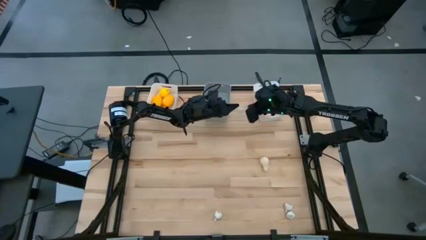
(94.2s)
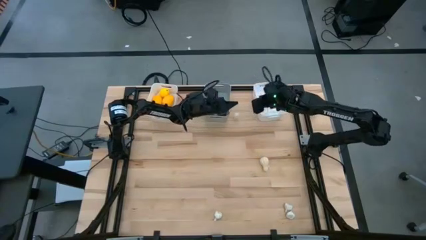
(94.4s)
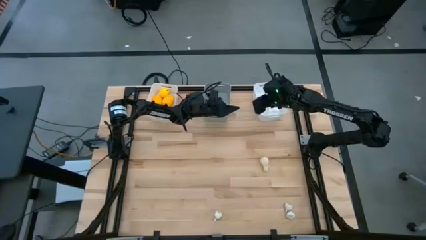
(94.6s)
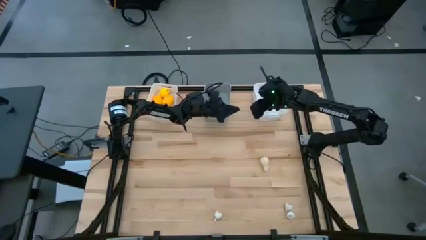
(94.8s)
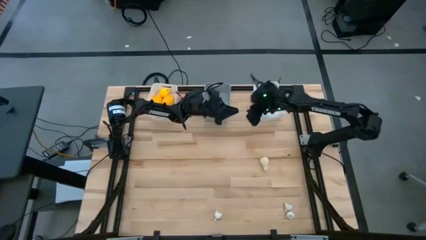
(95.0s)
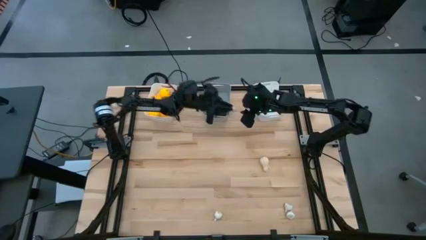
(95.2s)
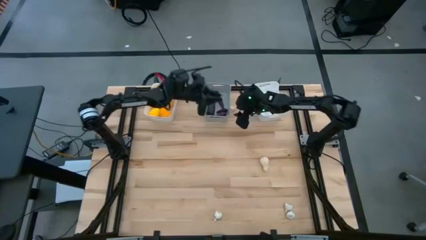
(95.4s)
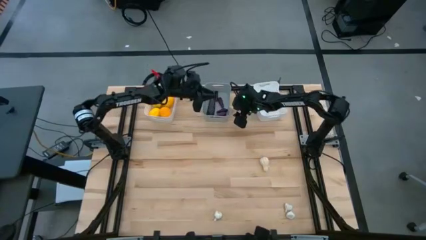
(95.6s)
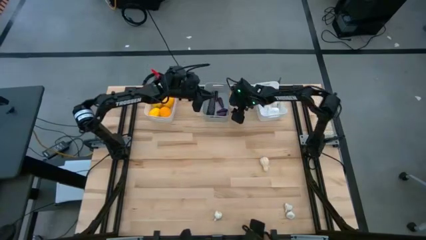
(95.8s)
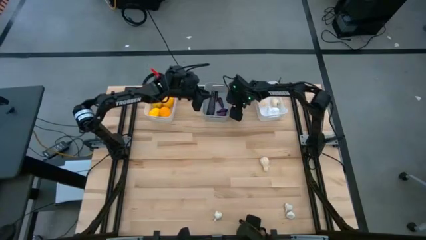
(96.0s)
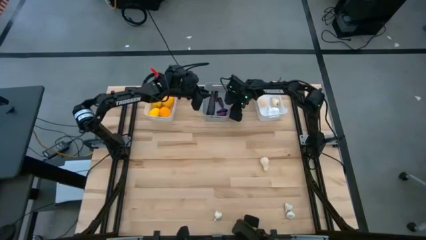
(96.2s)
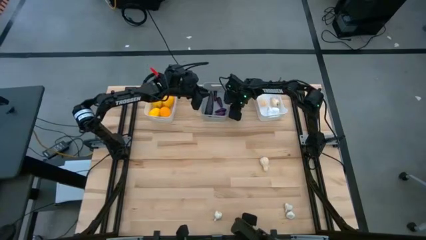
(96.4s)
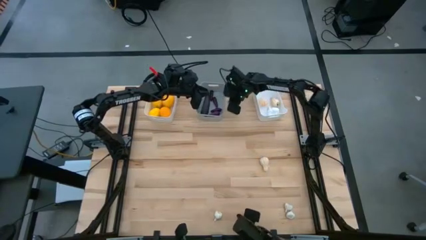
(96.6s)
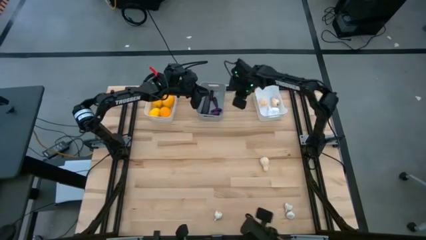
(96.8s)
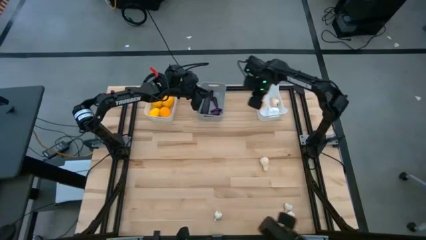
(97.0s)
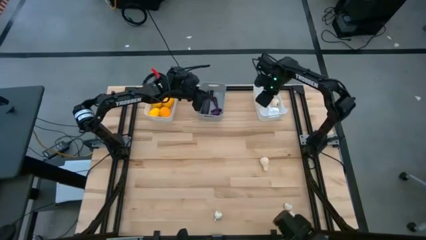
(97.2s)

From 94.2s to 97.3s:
Task: Sort produce into baskets
Put the garlic into the right white bin

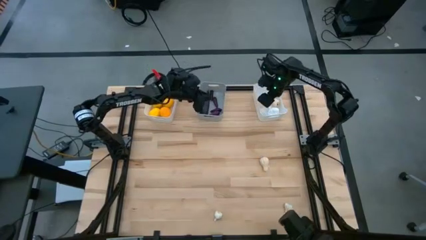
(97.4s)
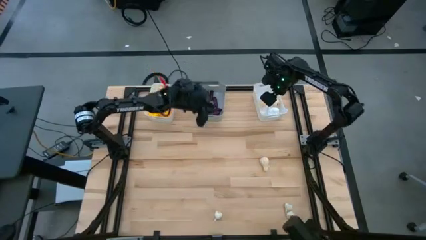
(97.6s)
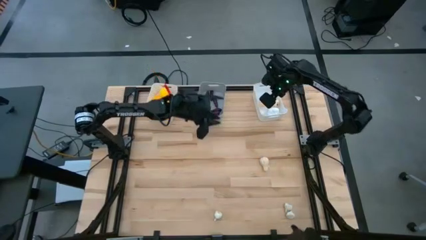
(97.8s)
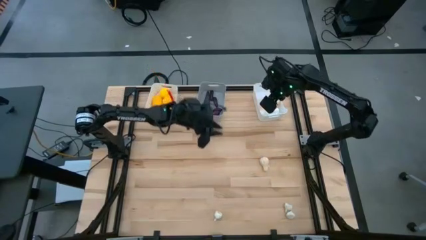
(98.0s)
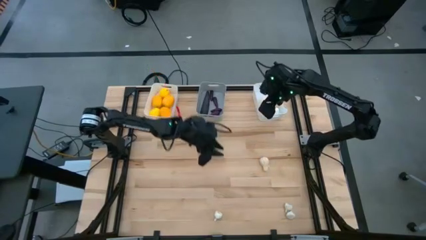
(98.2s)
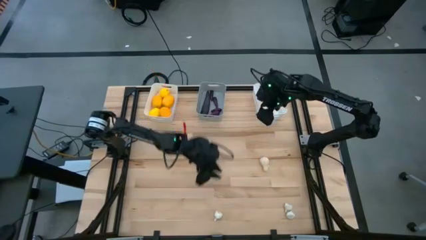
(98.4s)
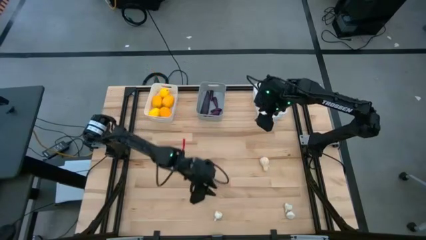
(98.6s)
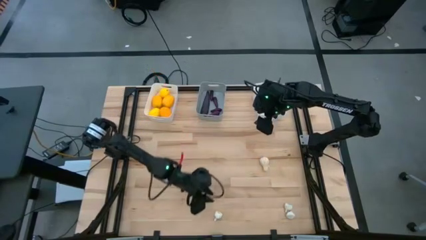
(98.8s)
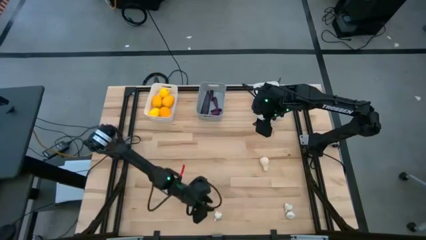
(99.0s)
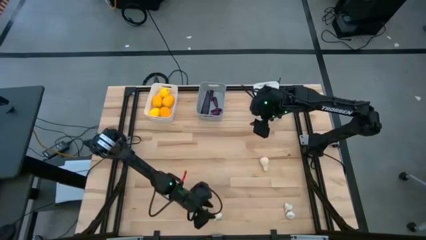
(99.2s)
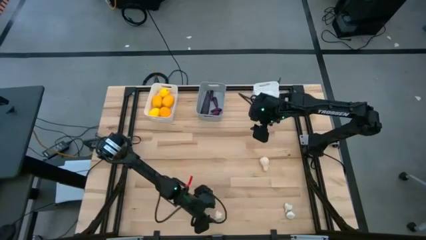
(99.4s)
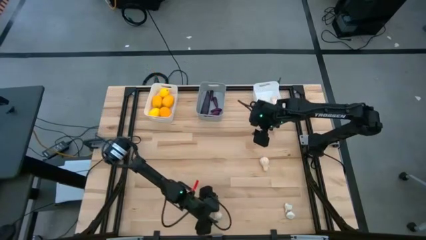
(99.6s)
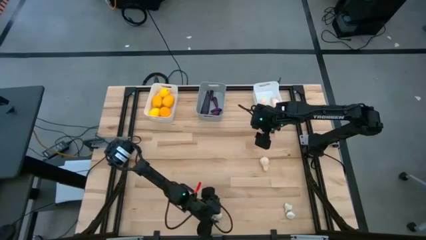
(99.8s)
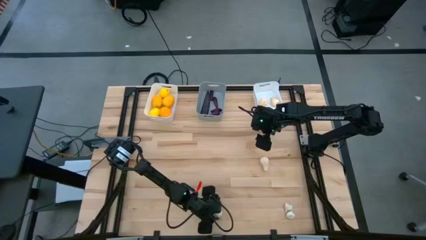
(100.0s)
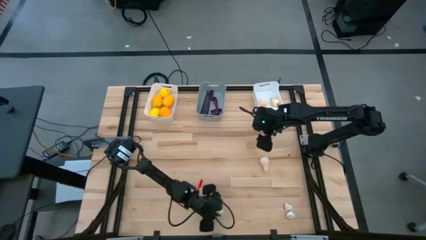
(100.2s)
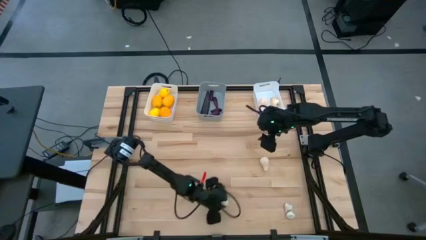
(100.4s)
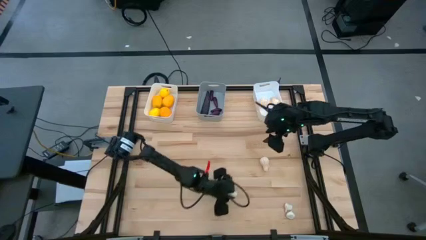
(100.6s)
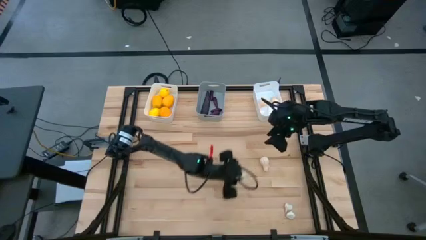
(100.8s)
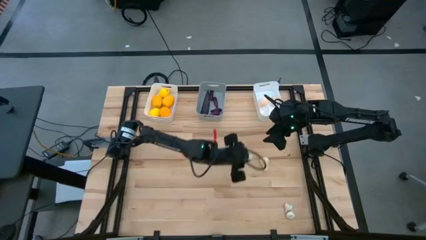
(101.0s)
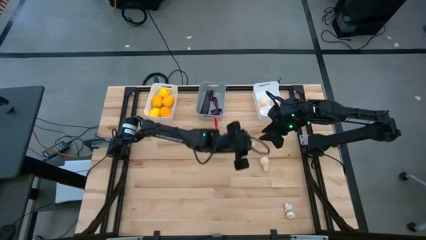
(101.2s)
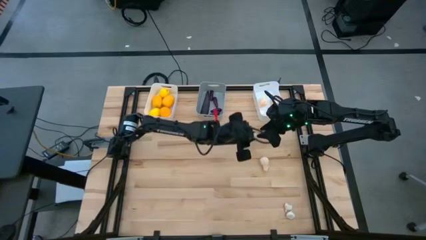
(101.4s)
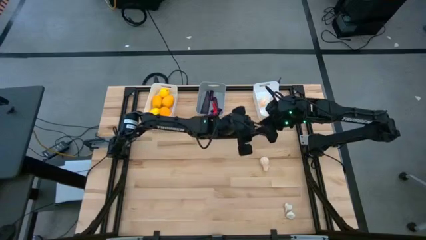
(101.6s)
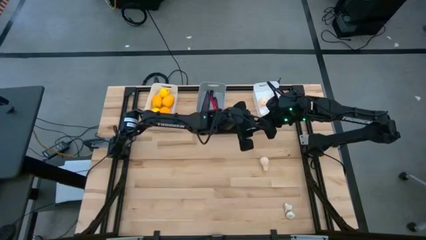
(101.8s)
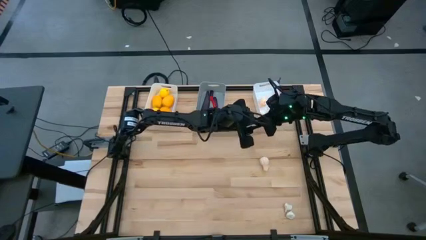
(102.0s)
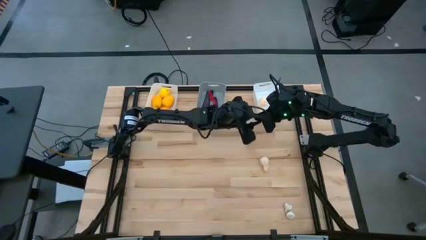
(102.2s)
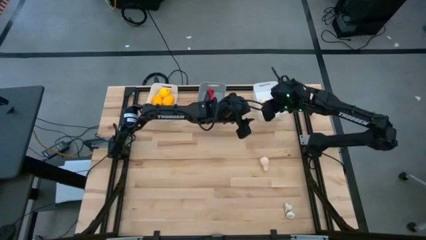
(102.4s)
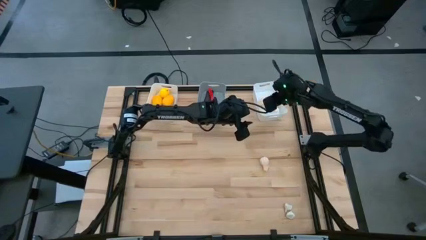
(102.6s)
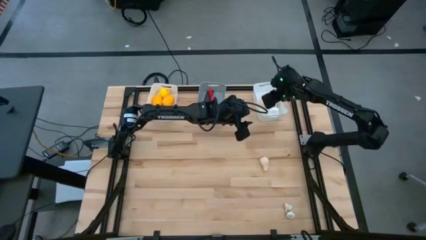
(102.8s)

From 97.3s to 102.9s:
Put the garlic into the right white bin

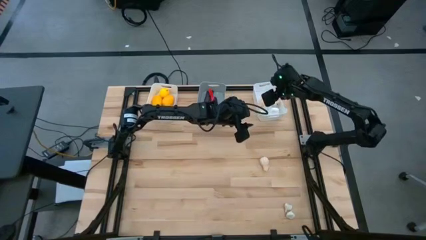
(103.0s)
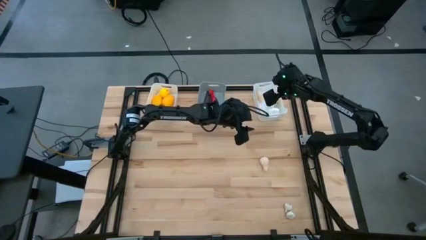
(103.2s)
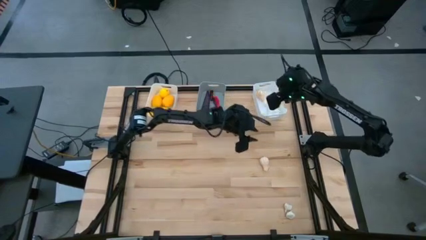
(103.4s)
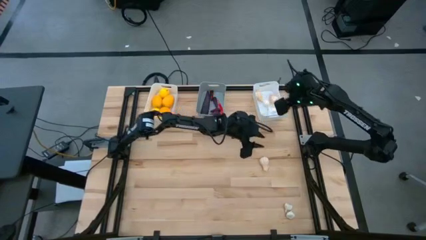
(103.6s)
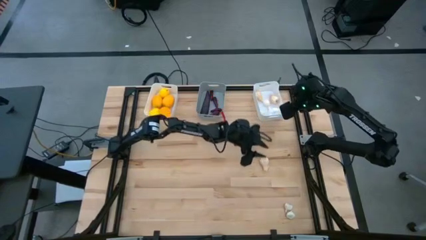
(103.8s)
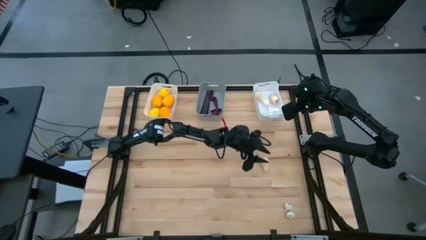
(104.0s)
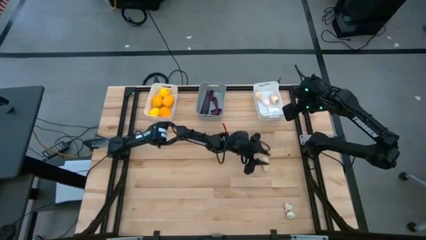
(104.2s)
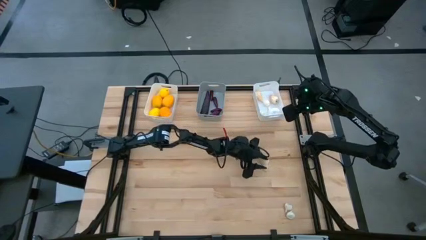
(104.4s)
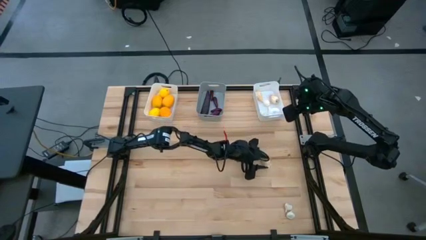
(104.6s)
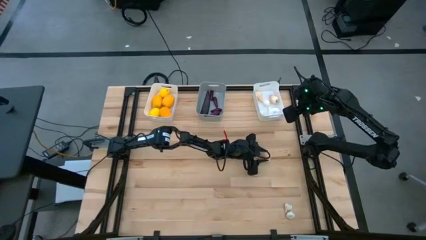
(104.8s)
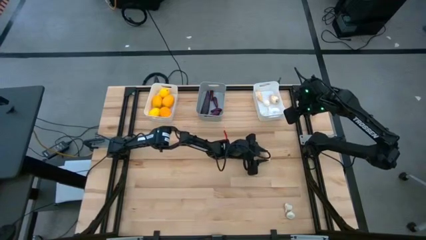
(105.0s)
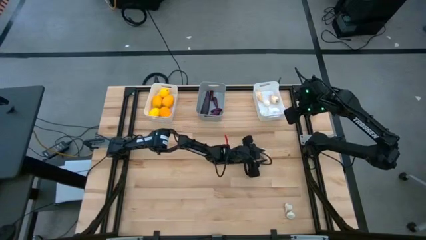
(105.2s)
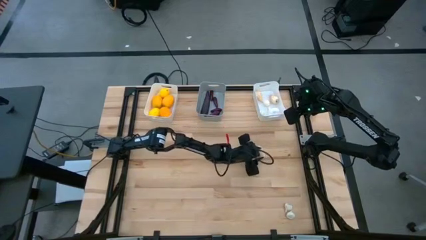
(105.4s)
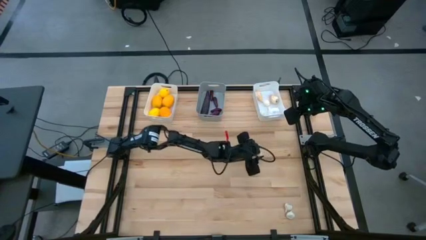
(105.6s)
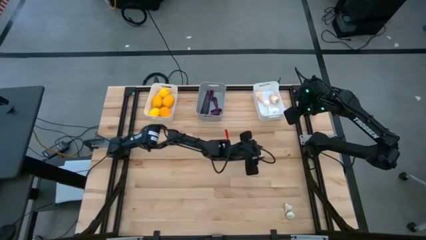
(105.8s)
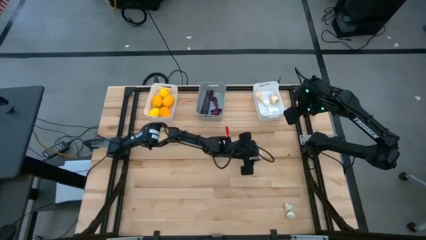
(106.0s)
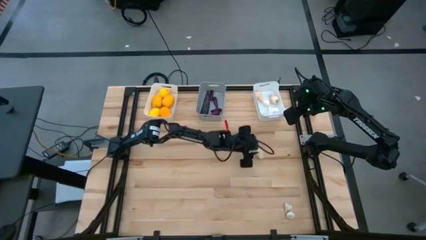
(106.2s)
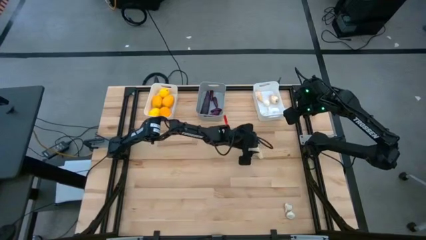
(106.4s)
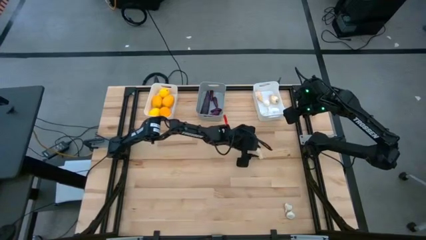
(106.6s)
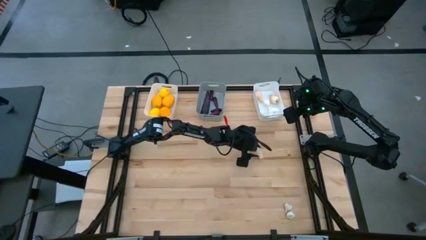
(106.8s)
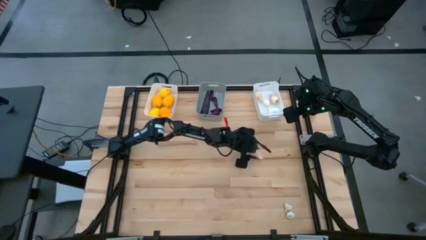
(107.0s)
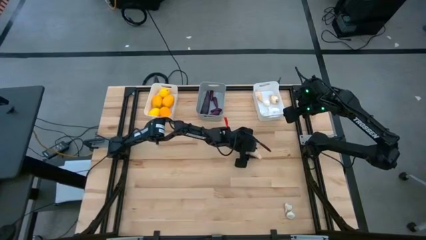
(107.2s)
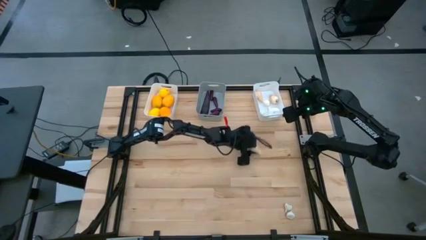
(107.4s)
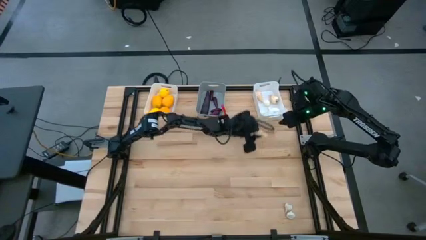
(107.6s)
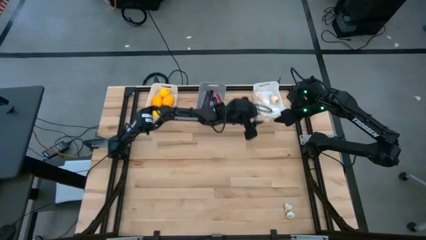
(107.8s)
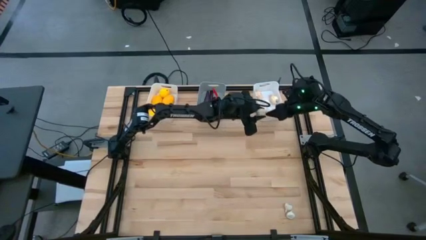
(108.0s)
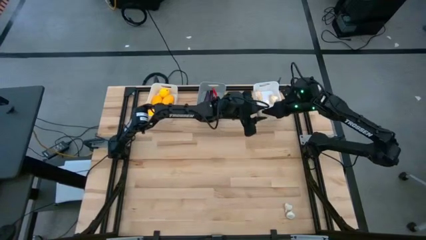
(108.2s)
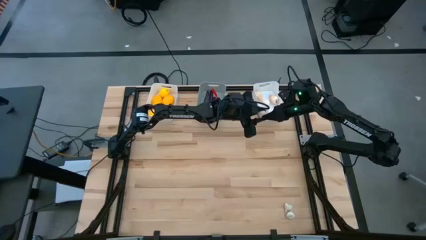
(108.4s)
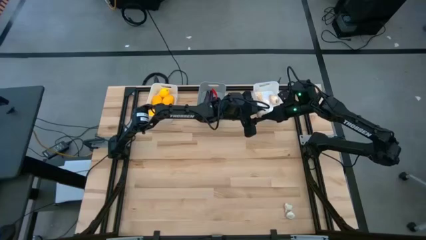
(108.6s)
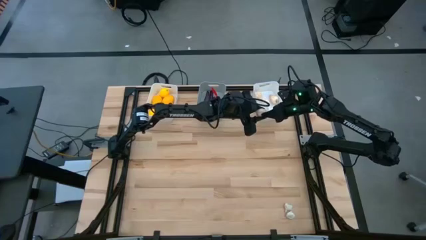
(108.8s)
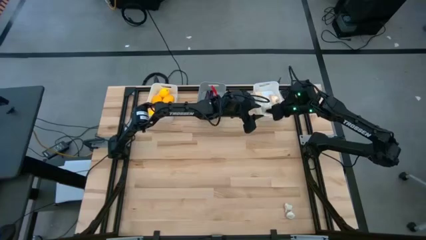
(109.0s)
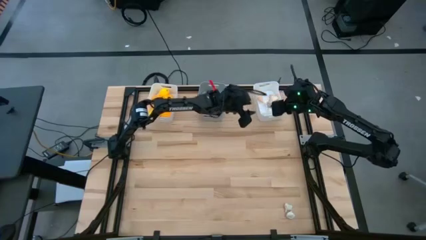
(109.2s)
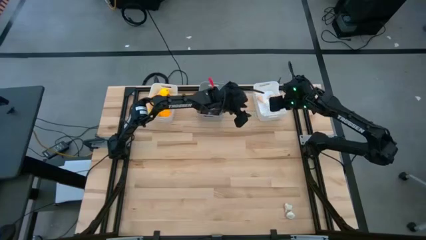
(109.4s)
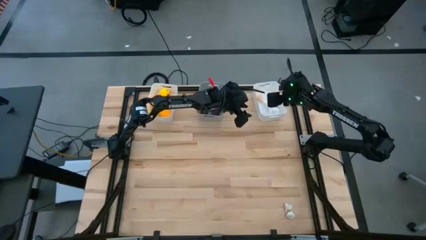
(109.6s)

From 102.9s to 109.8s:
Put the garlic into the right white bin

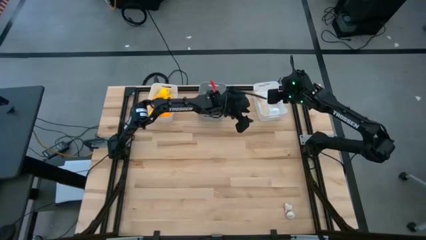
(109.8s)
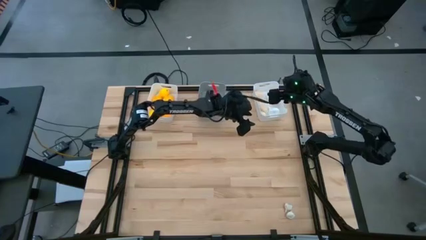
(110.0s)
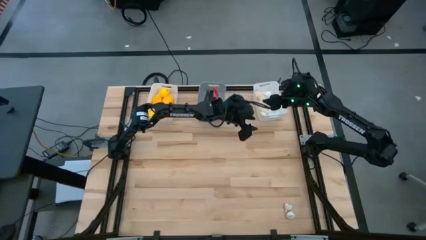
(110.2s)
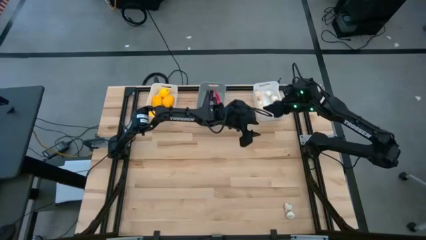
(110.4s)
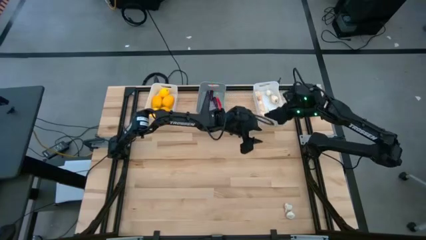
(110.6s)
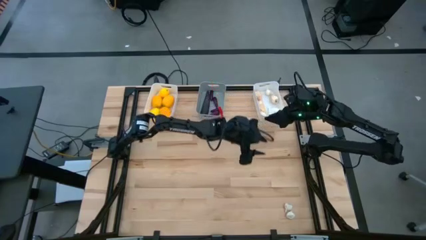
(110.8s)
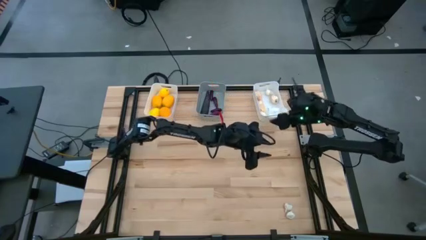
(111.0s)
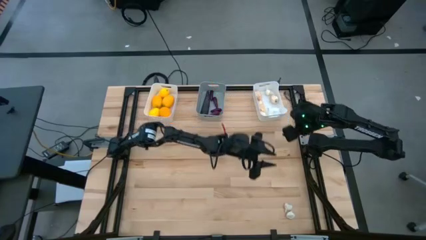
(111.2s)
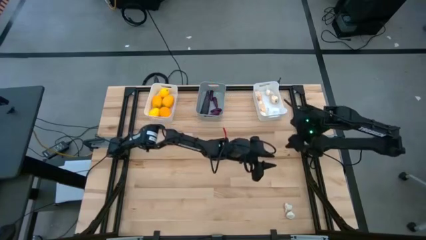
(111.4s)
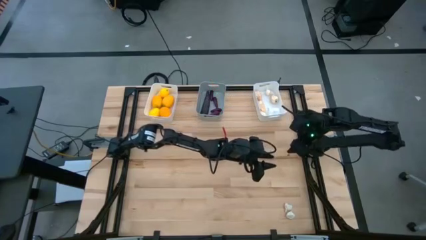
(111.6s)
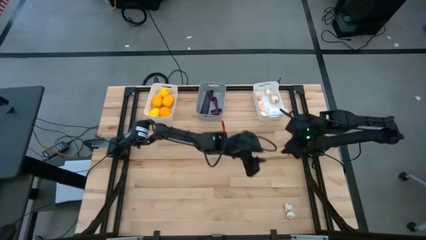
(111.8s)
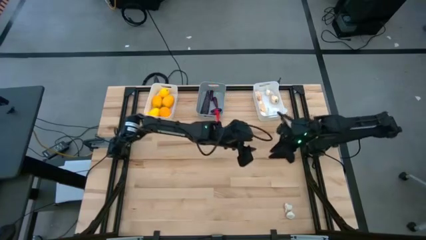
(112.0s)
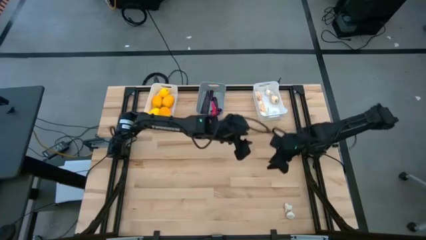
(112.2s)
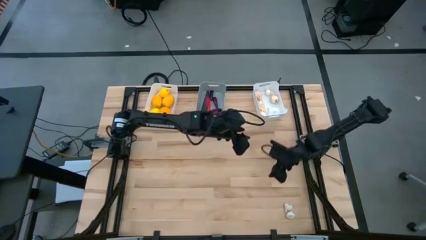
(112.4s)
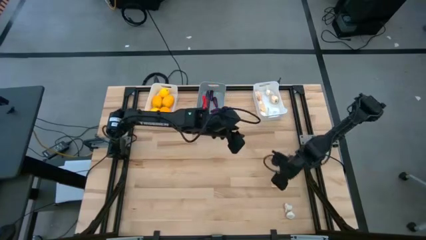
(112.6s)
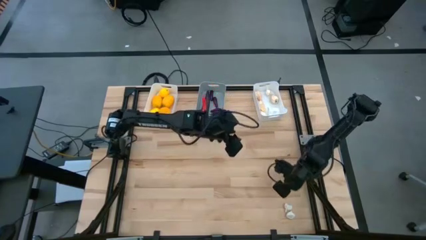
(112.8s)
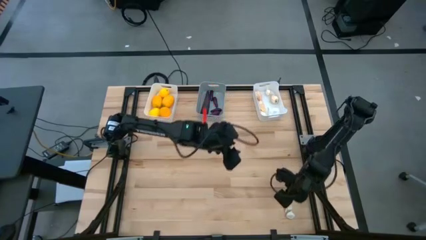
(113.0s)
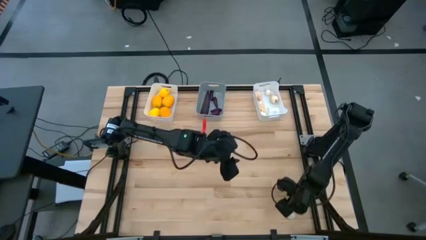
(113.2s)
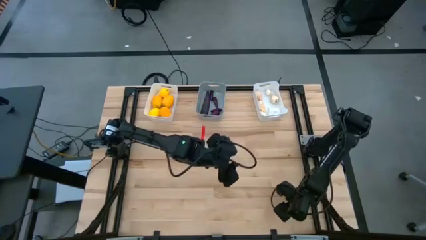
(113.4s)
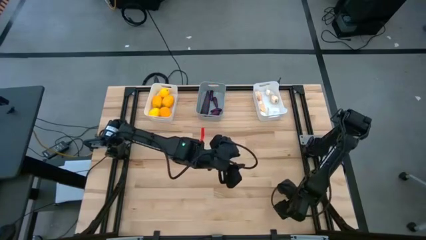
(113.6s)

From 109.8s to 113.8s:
Put the garlic into the right white bin
